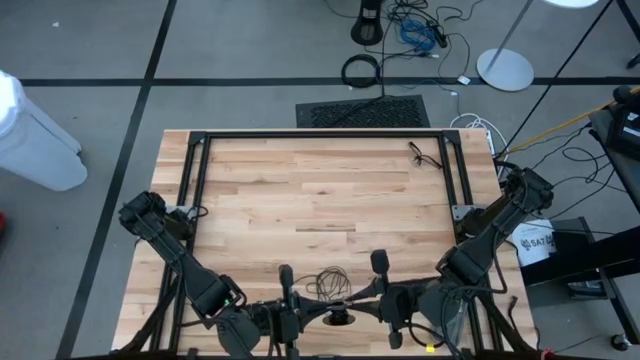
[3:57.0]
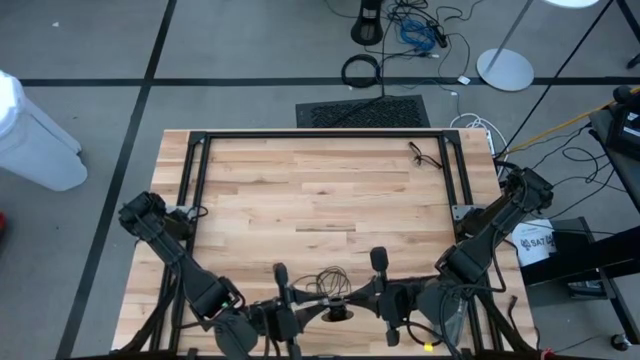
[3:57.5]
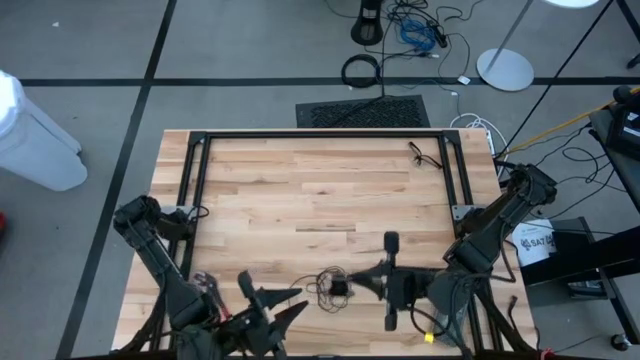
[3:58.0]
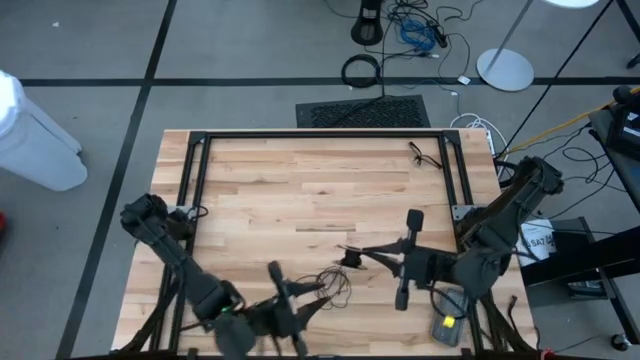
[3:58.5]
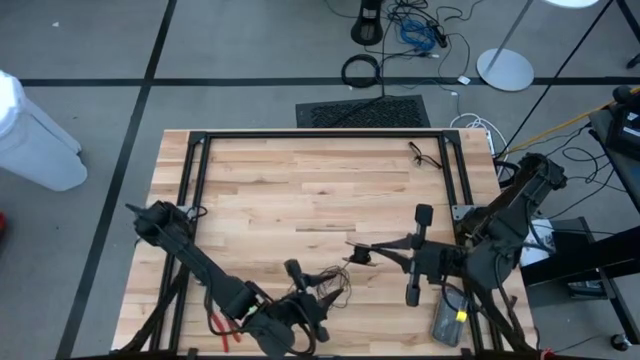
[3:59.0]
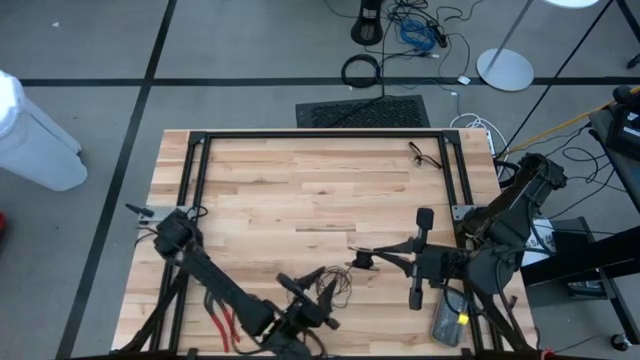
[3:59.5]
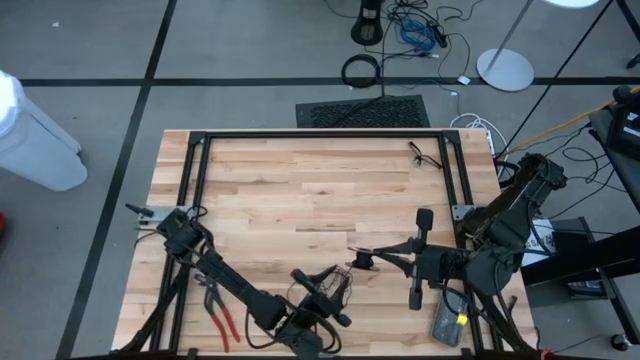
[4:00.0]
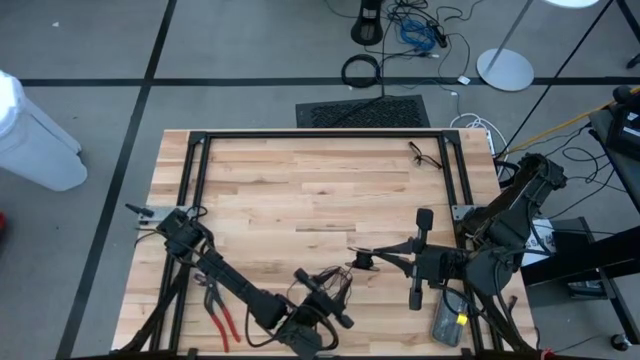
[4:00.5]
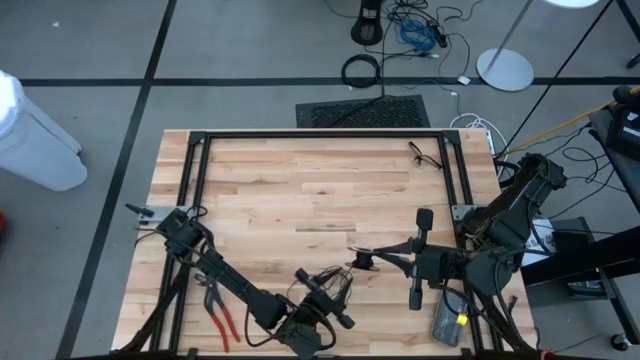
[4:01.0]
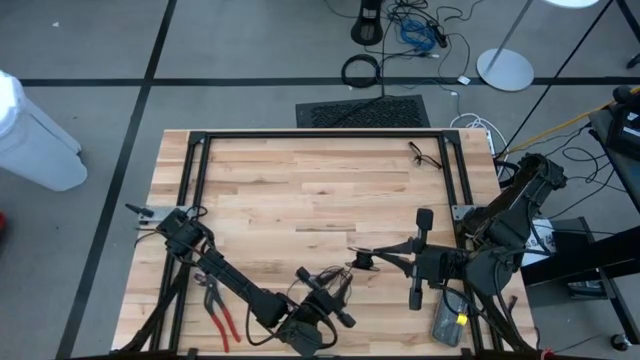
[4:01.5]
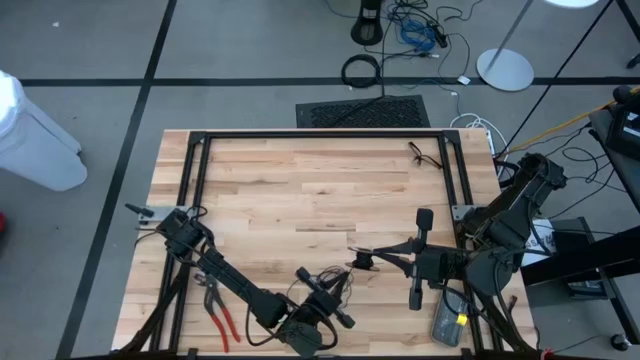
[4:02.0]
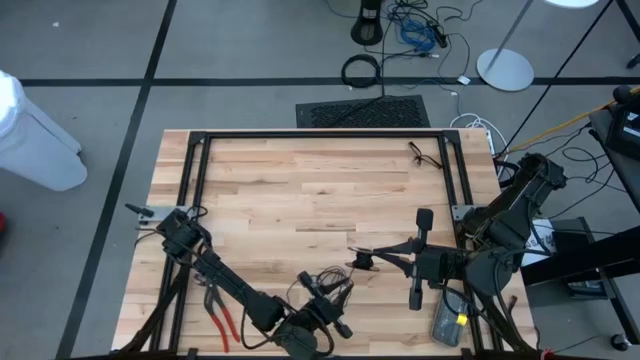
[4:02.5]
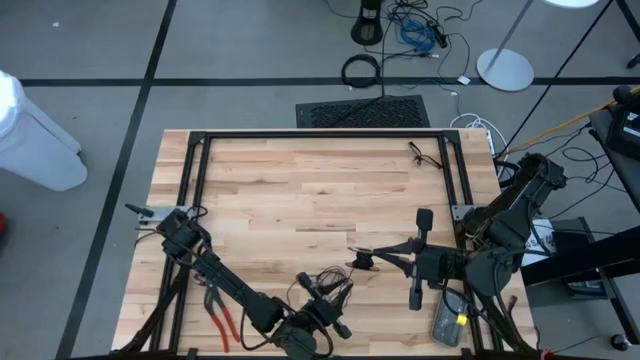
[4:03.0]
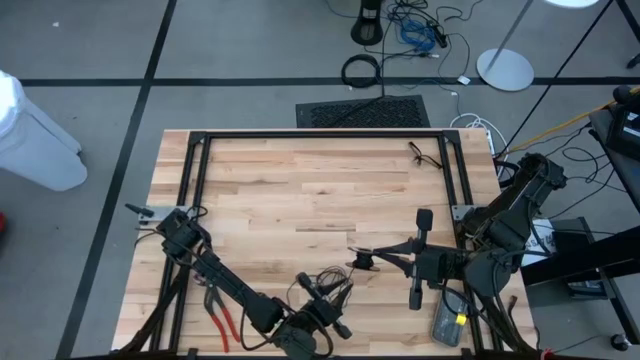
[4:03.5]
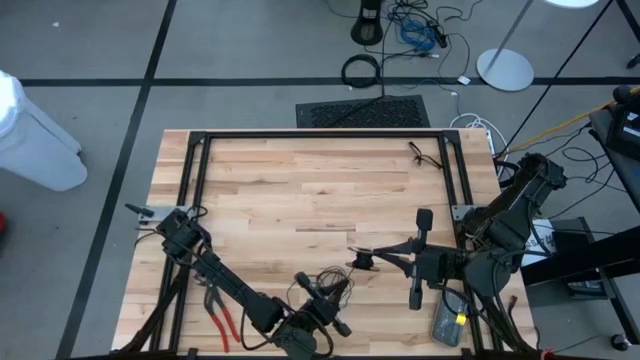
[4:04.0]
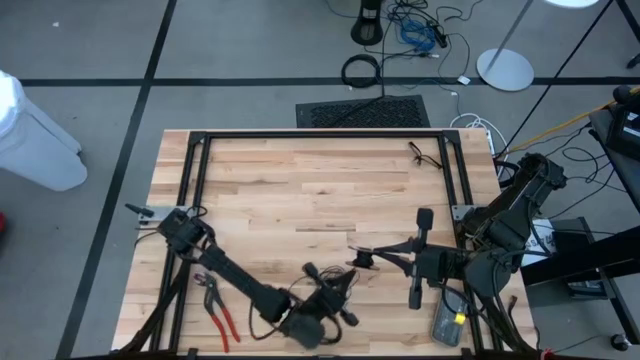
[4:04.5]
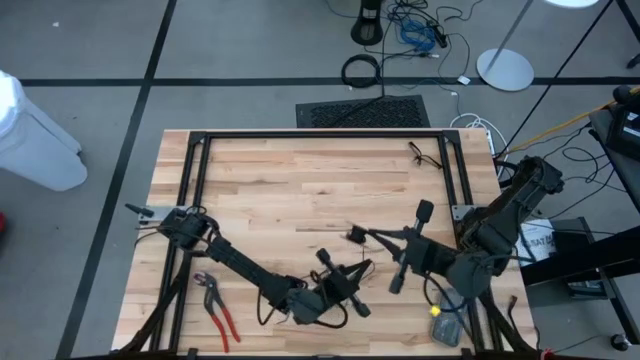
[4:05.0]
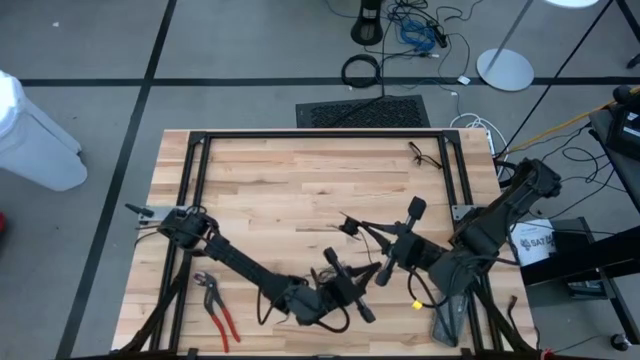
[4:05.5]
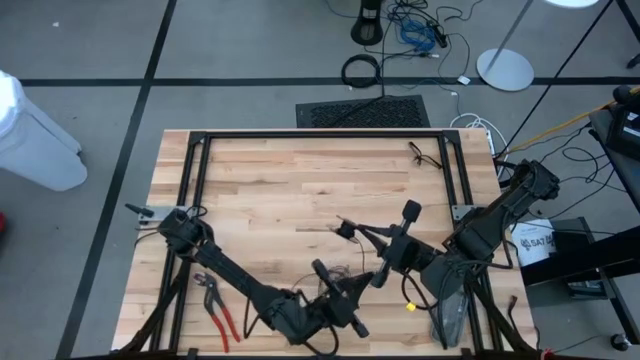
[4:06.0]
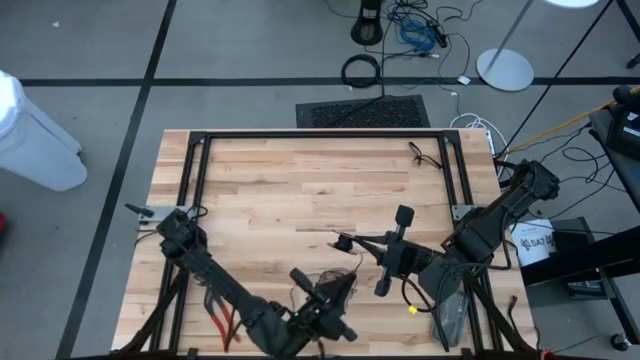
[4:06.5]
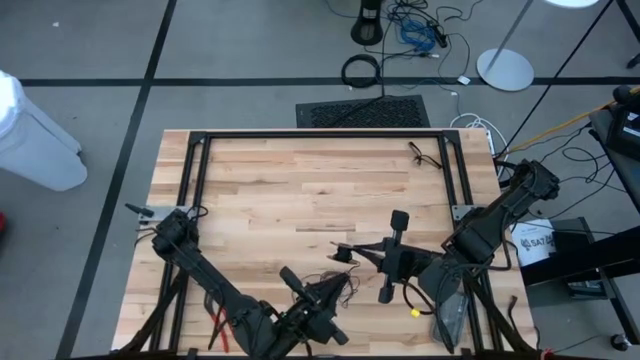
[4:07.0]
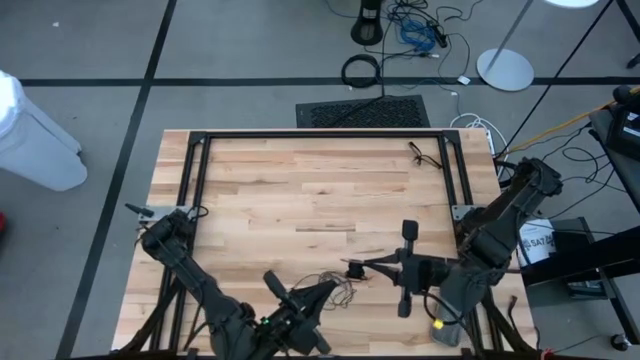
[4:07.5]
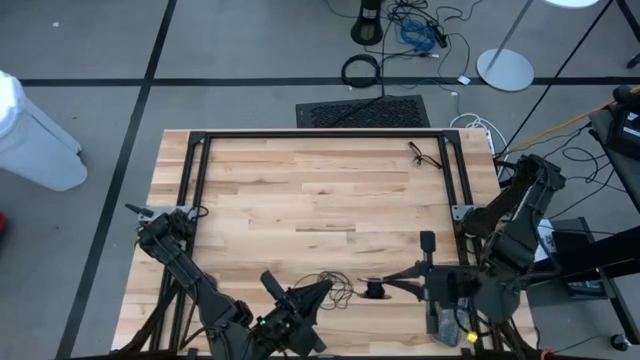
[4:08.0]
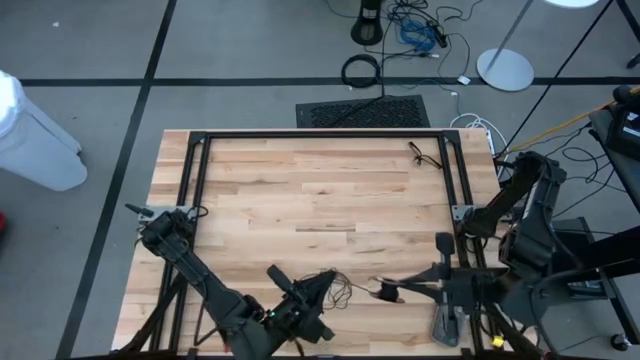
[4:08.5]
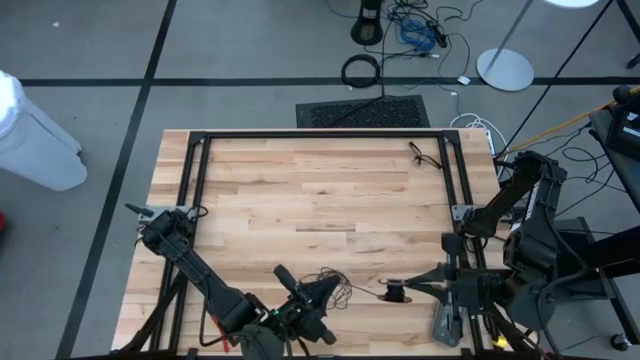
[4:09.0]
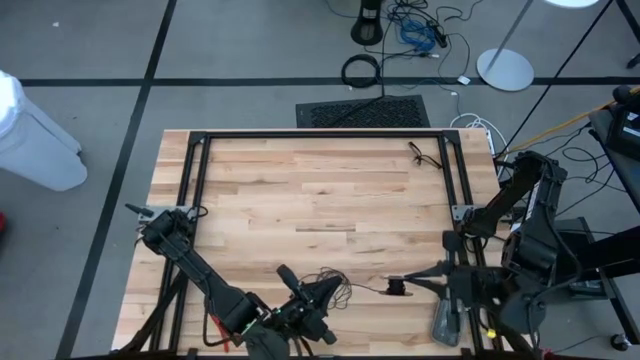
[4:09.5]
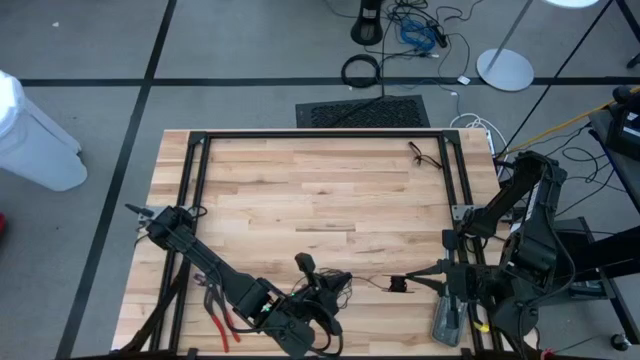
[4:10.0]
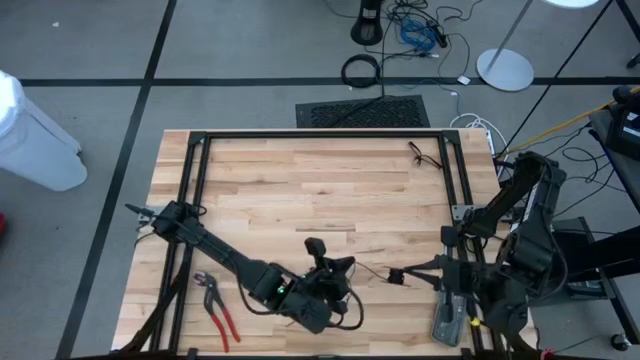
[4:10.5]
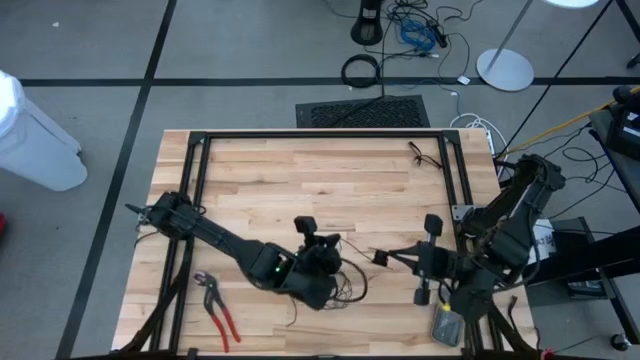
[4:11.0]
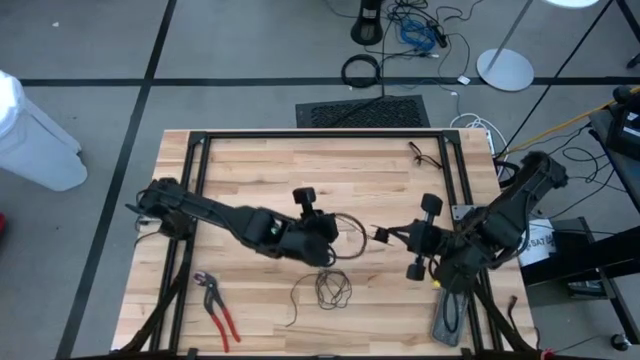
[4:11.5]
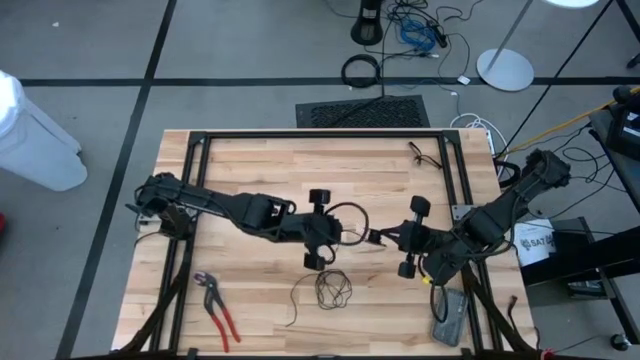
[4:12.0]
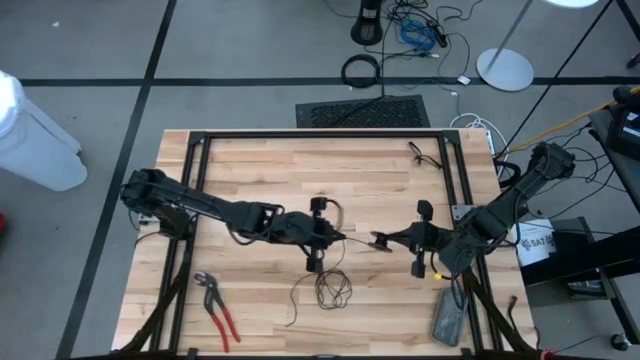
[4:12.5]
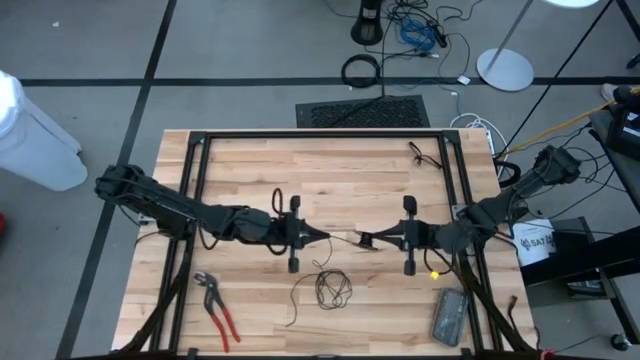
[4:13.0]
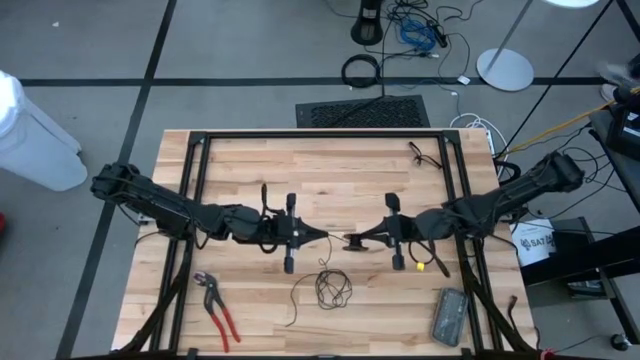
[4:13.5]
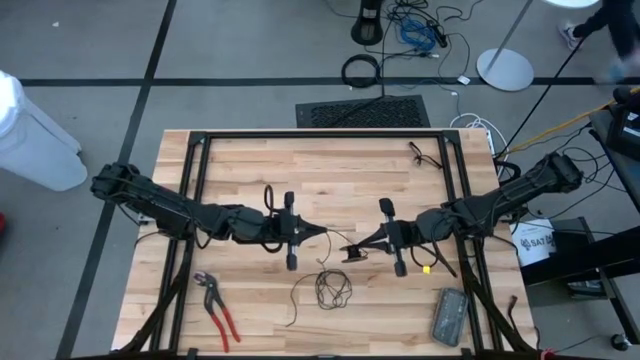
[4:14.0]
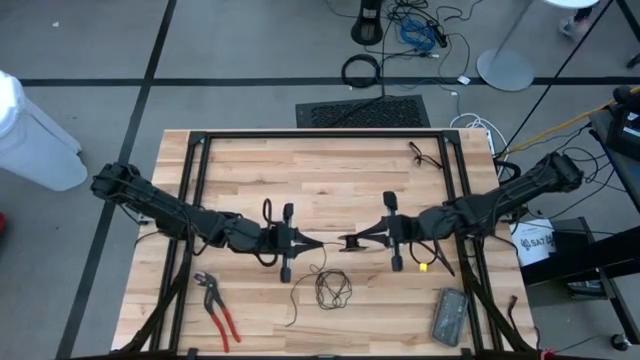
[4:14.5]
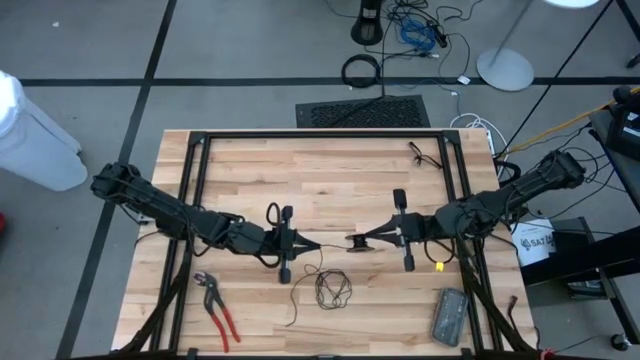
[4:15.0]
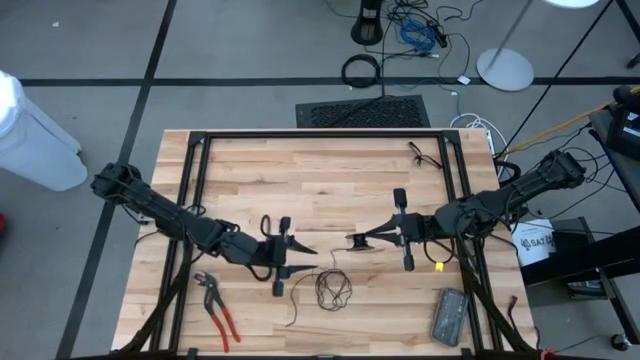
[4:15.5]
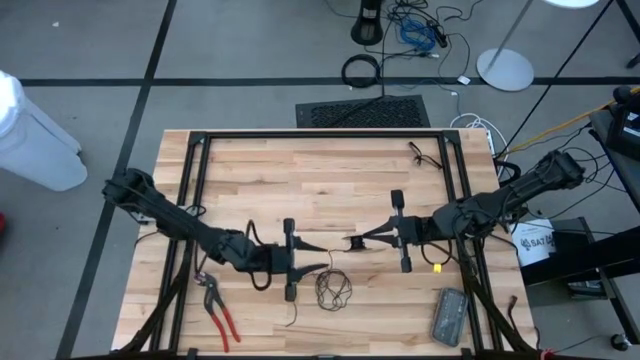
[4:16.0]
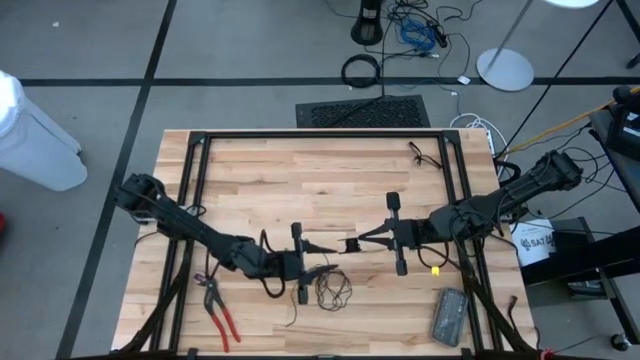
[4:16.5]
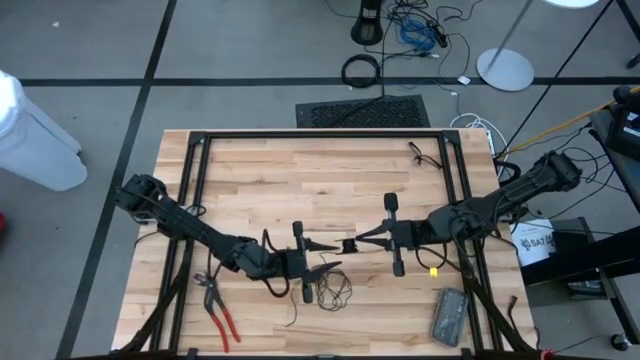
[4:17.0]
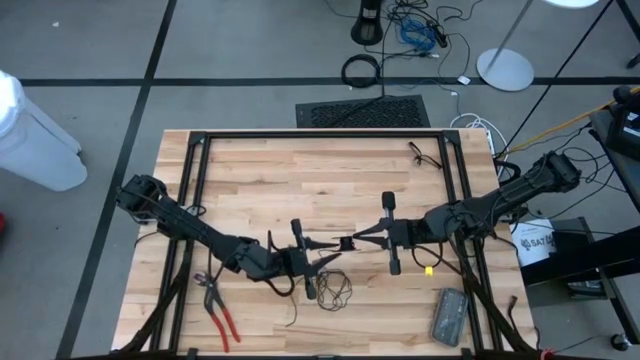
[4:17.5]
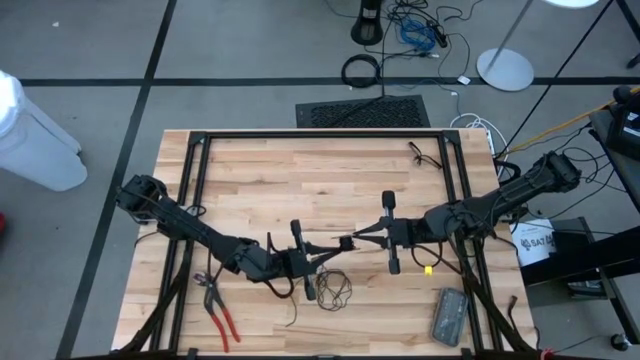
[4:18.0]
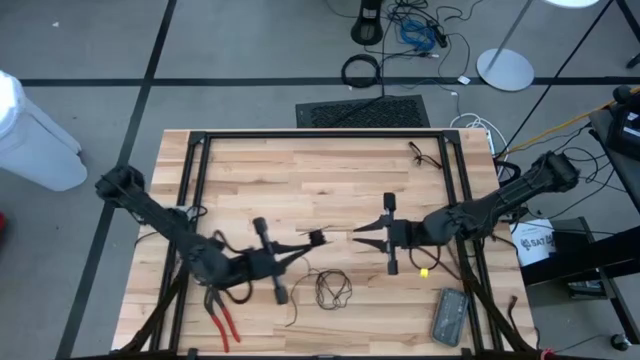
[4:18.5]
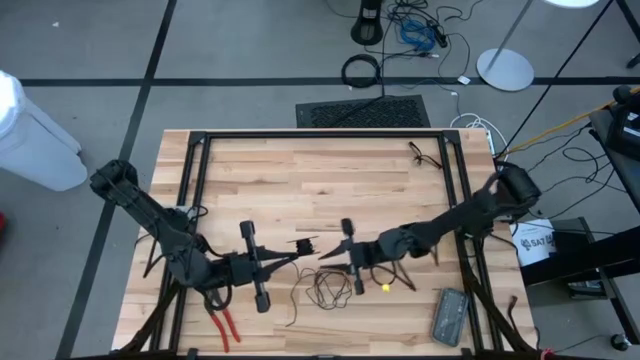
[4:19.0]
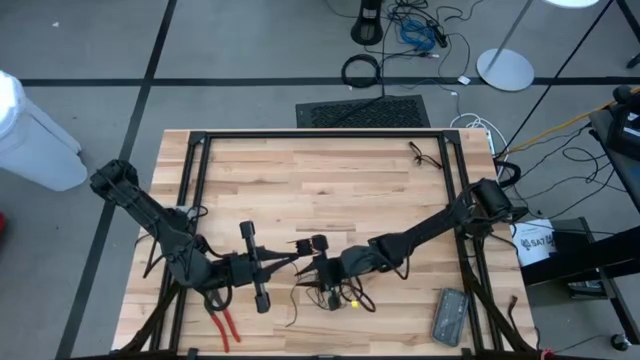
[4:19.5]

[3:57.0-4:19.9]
Task: Coil cords
Coil the black wire onto the black spool
